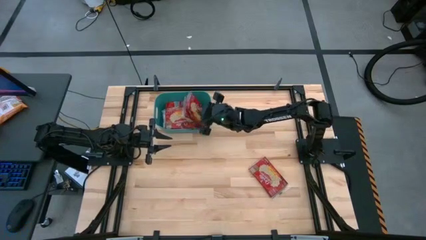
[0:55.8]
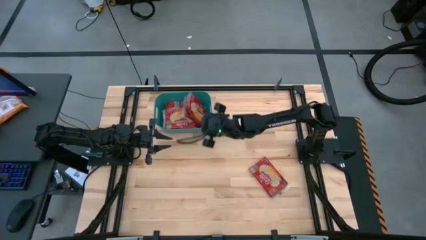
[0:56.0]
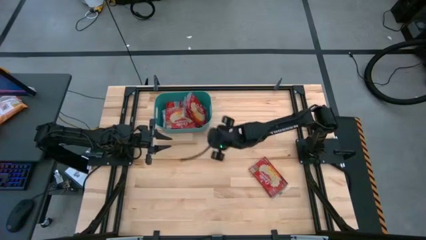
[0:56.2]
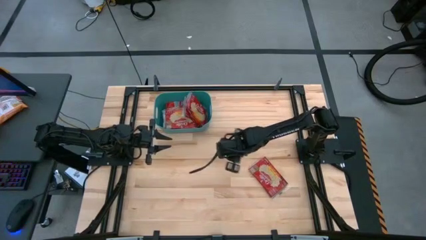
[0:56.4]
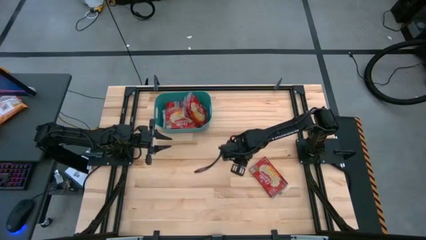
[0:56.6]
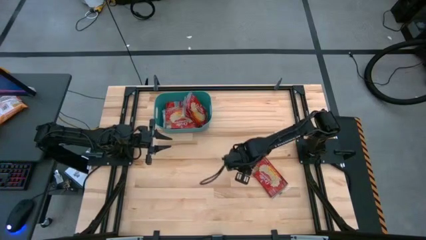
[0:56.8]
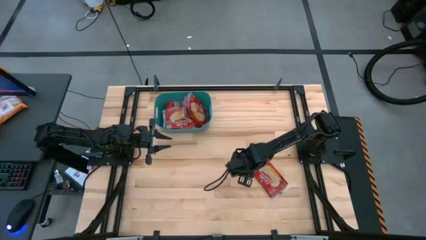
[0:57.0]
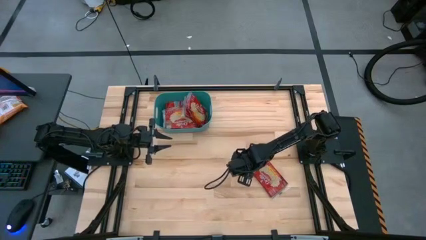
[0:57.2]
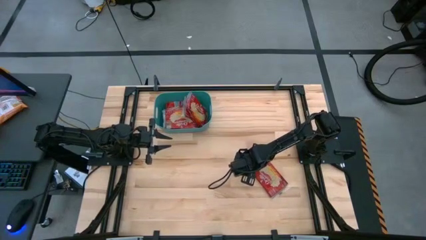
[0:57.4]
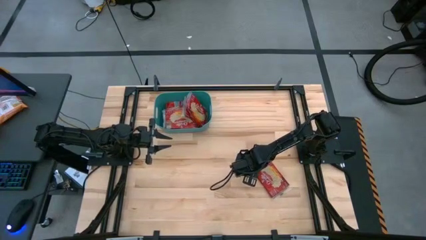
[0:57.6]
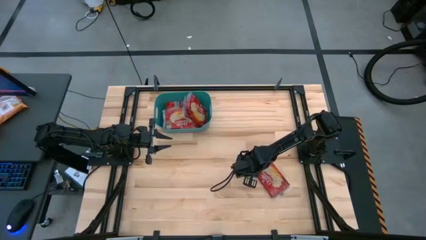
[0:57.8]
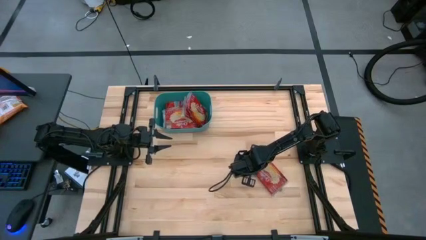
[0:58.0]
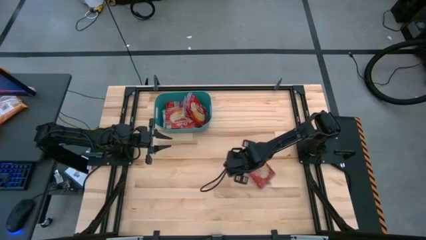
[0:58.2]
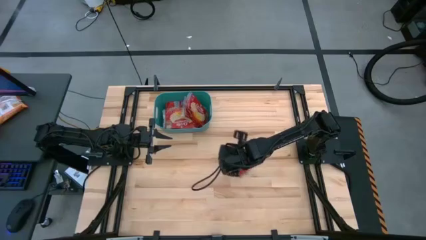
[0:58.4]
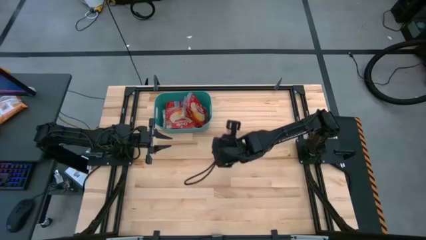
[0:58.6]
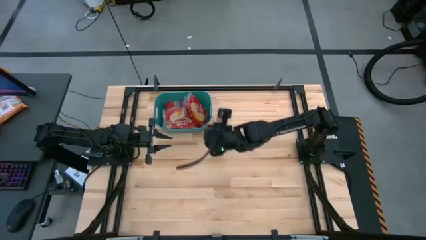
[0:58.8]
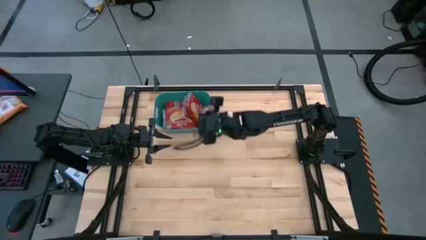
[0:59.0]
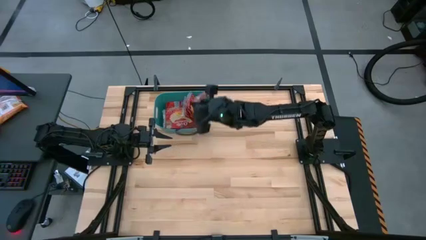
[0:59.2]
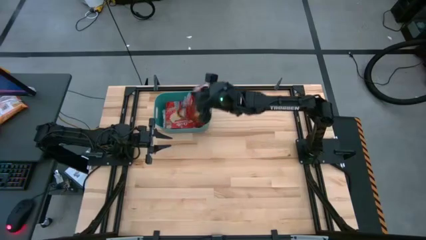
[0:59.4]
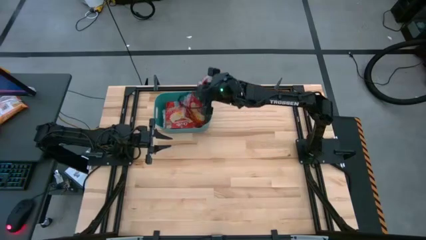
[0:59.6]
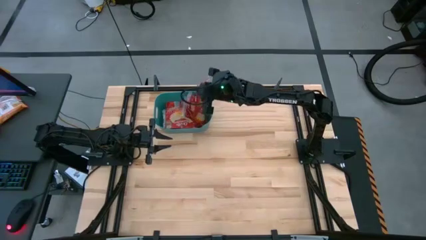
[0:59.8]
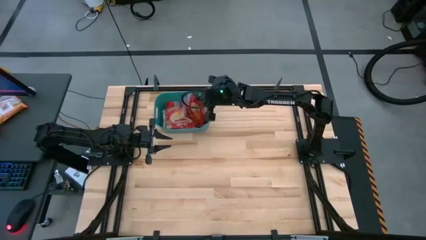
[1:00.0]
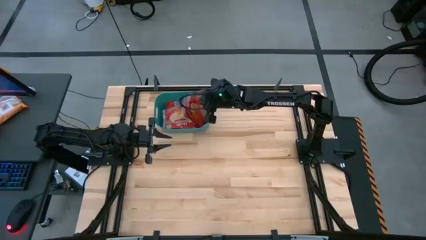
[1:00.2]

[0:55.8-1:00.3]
Task: Sort popcorn bags into baskets
Put the popcorn bag into the green bin

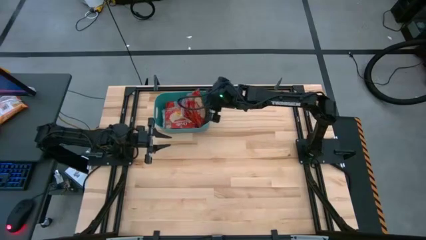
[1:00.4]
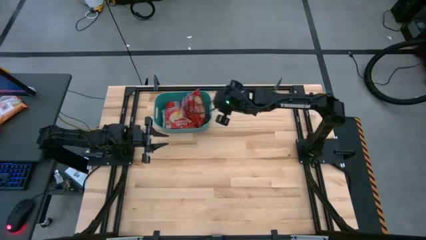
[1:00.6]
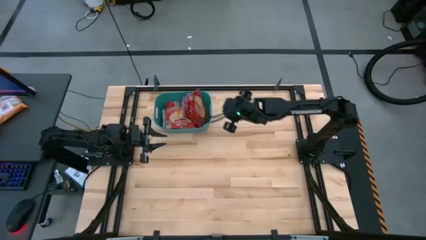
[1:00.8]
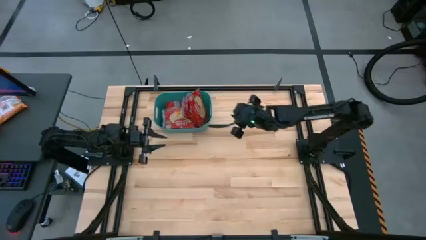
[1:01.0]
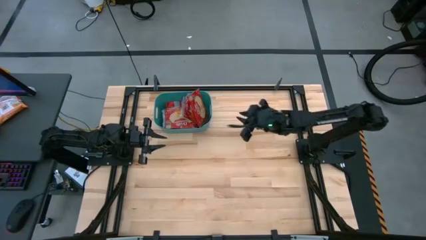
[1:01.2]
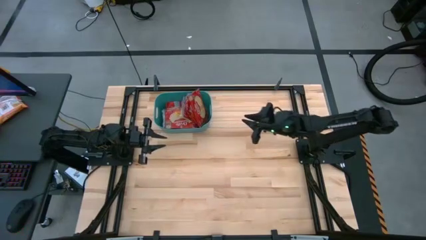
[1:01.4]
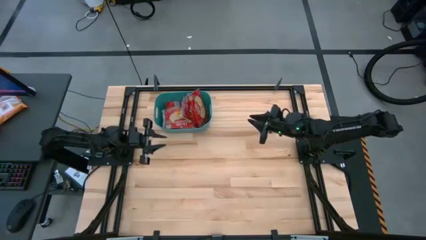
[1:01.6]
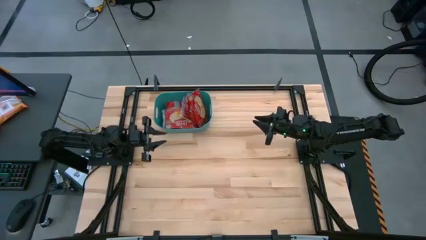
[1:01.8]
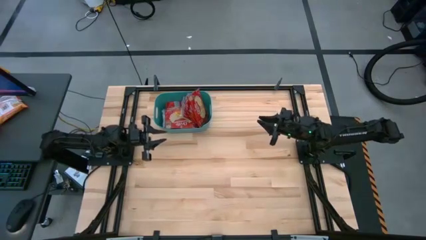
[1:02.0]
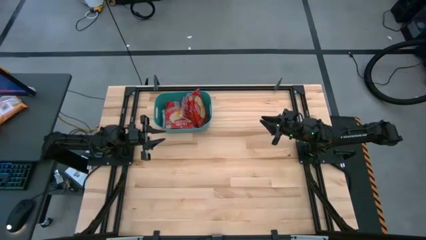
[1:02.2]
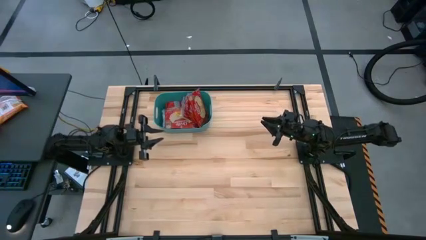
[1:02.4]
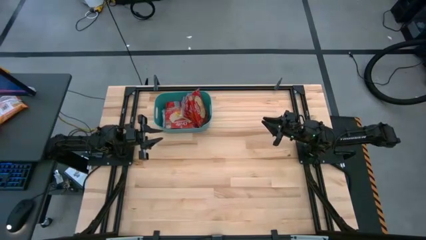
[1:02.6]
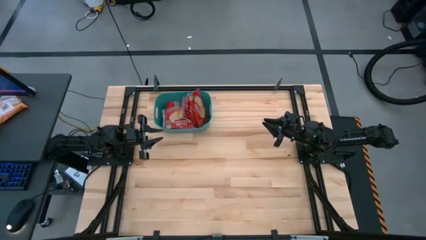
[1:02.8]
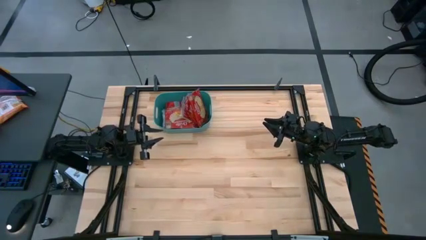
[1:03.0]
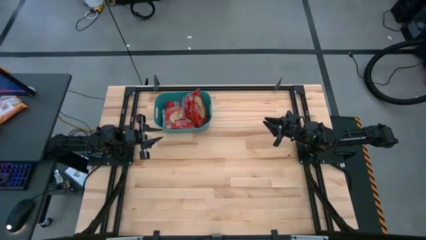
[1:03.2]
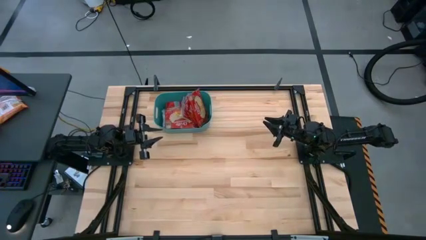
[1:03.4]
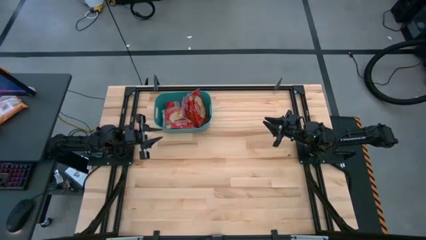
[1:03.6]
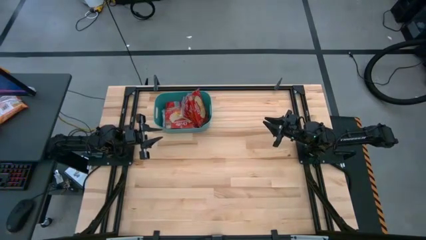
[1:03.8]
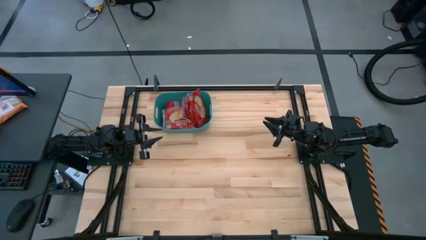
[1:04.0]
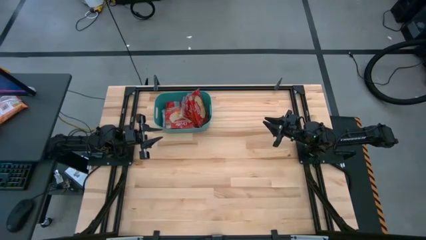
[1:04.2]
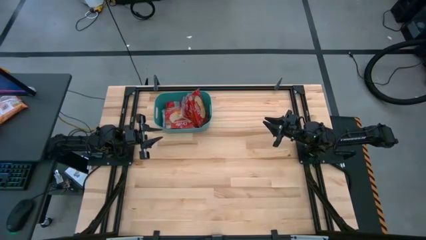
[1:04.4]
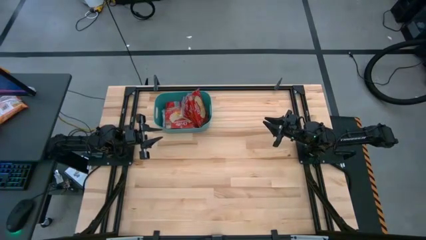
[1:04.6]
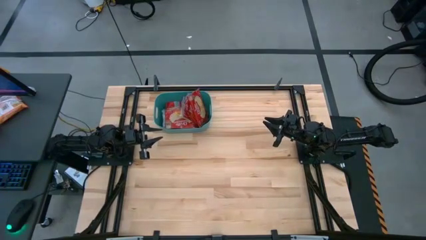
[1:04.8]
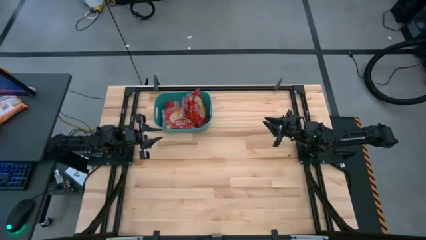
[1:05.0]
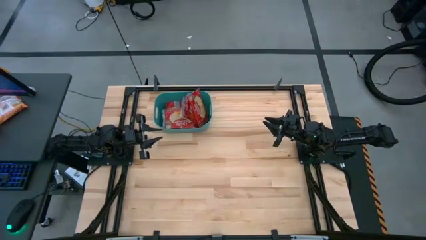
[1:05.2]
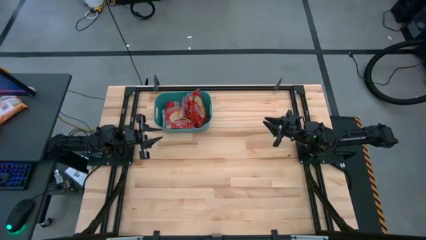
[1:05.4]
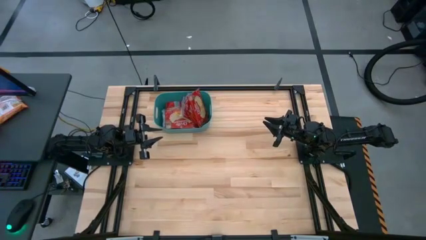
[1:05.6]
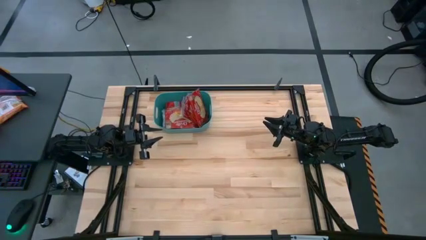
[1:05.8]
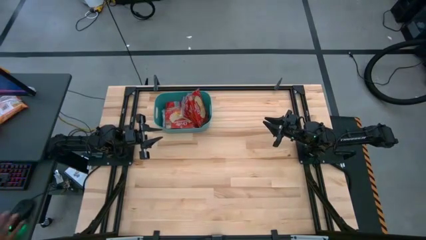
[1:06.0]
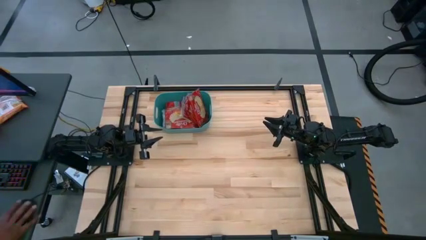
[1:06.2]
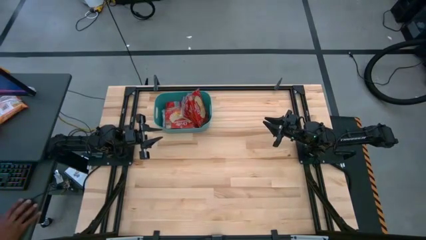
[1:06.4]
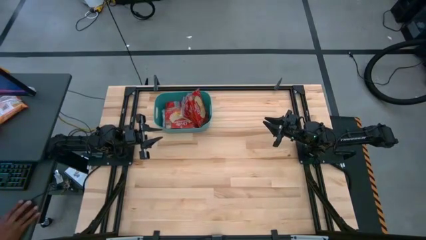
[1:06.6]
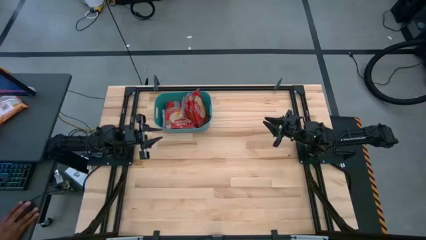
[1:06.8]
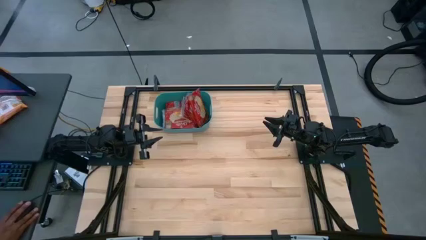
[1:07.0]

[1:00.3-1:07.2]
Return to Home Position

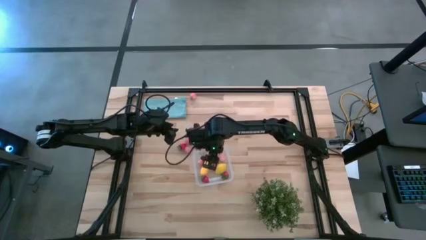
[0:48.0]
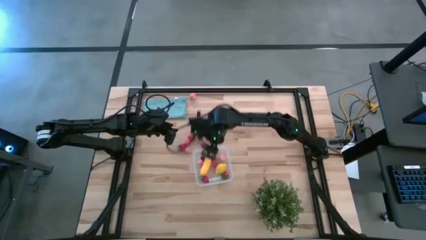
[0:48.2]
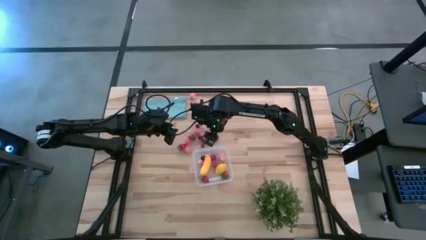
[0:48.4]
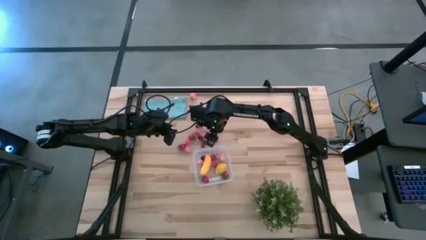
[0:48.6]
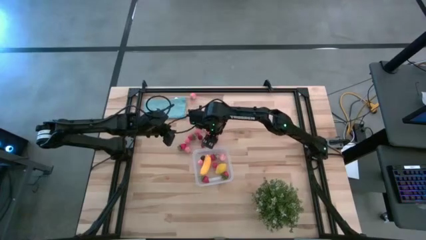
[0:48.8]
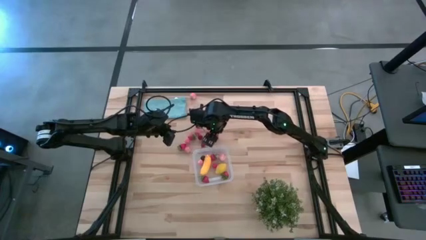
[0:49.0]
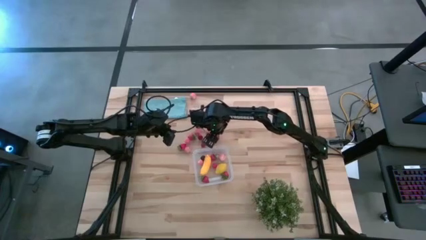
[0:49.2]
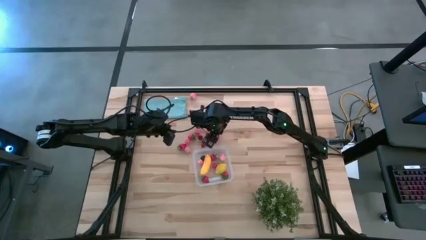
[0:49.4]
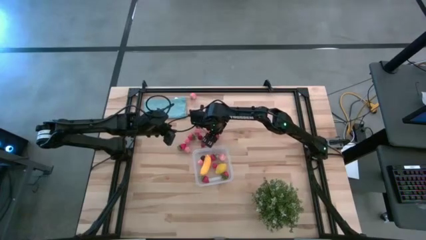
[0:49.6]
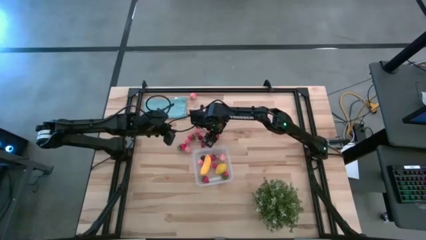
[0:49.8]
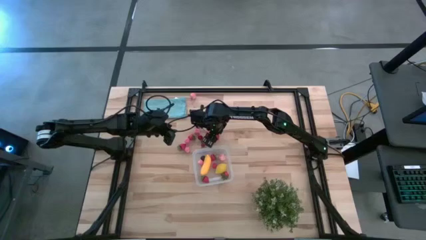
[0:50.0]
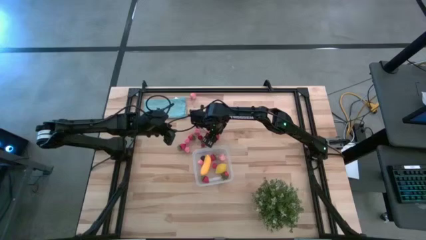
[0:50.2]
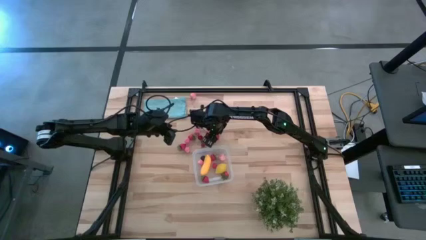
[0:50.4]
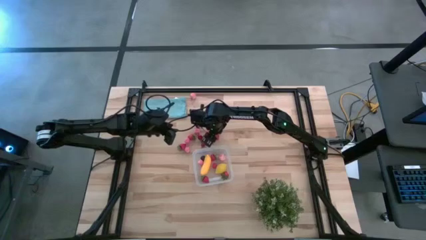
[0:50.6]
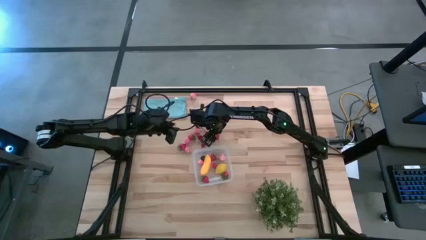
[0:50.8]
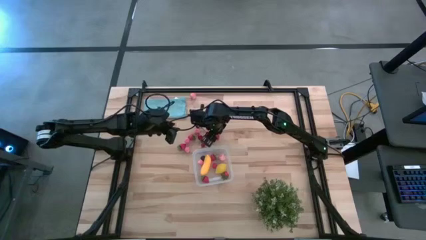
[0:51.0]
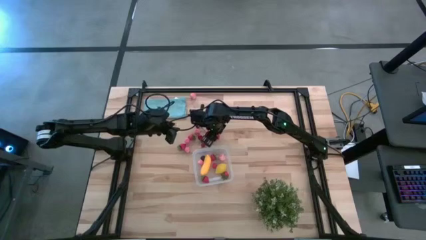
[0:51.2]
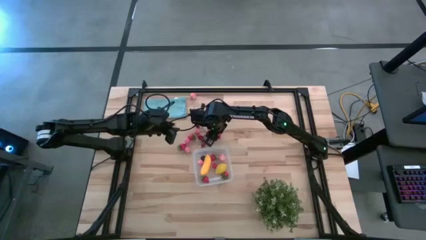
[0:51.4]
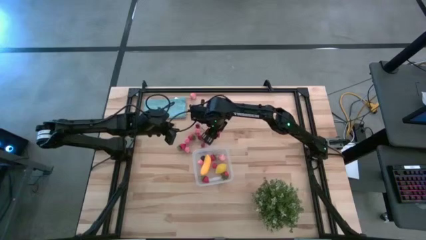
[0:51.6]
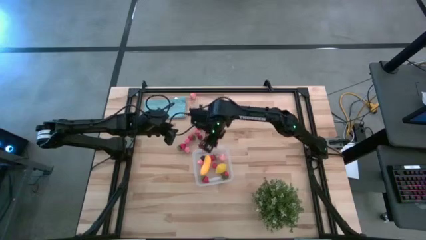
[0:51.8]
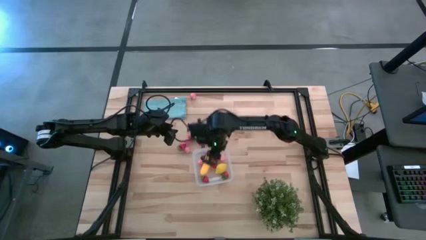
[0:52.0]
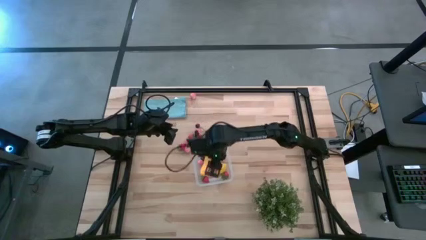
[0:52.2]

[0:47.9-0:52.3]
Task: Pick and placing Produce into tupperware
Put the red strawberry into the transparent bin

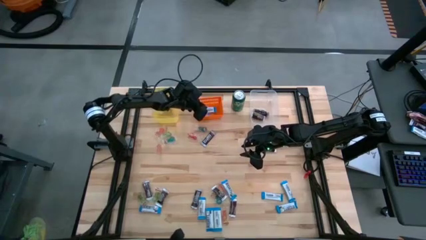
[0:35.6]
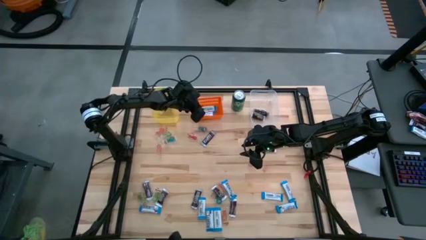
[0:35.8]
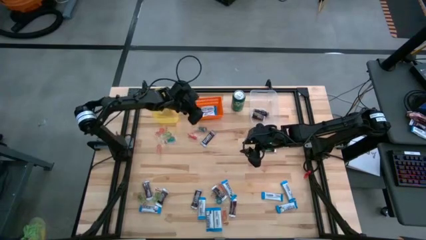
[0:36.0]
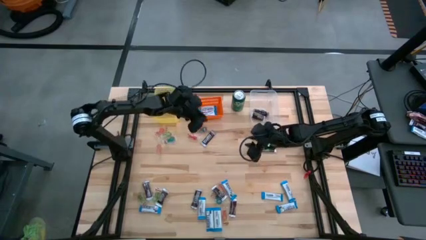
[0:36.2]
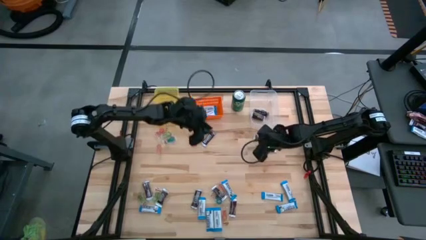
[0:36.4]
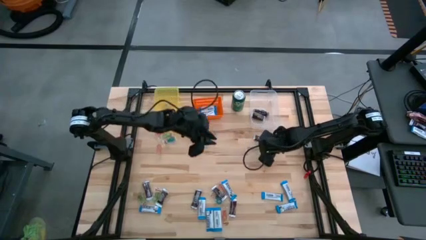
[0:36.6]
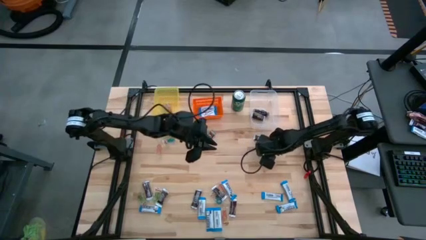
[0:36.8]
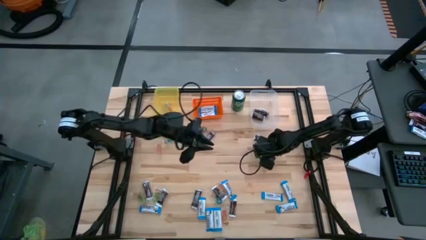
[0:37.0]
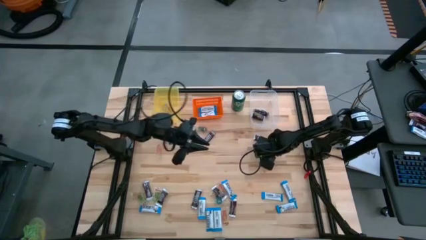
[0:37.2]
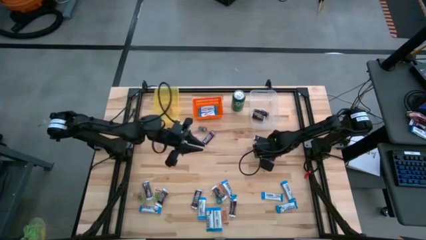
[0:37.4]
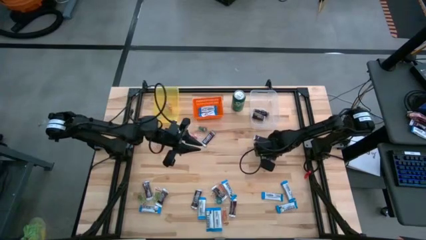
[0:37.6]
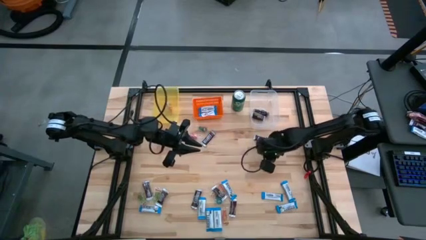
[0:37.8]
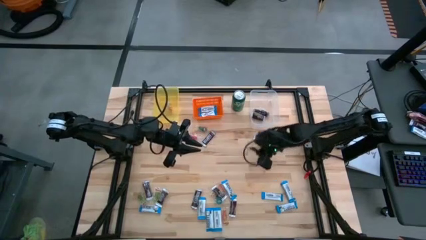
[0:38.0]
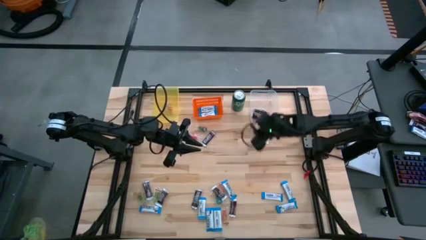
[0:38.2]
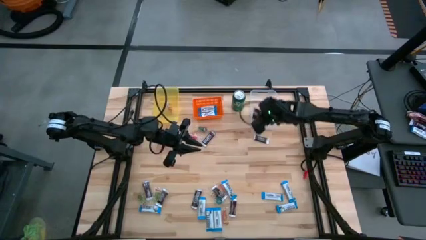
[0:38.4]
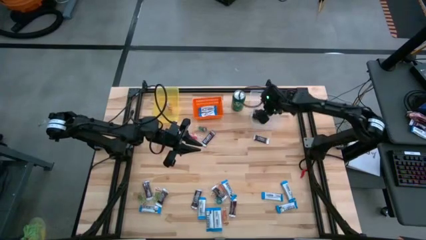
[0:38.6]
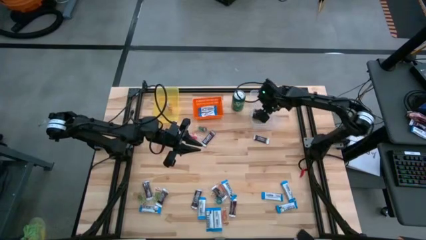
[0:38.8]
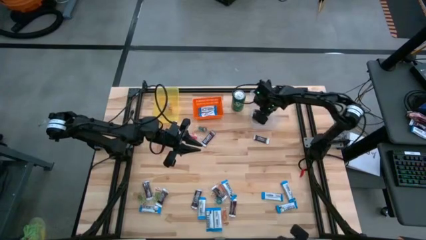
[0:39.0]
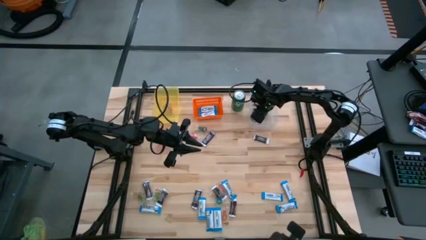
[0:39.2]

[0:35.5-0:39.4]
Task: Organize candy in baskets
Put the brown chocolate into the transparent bin
